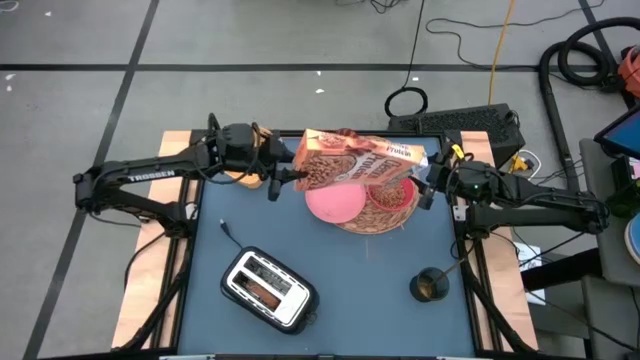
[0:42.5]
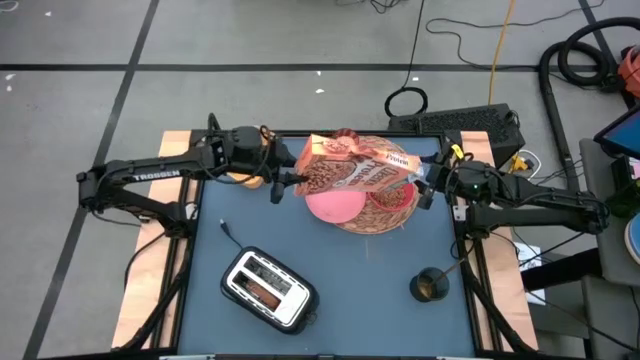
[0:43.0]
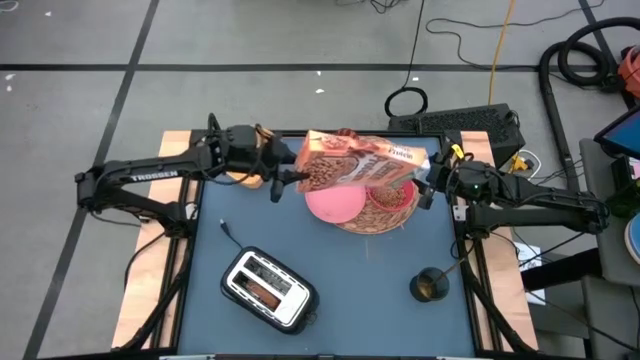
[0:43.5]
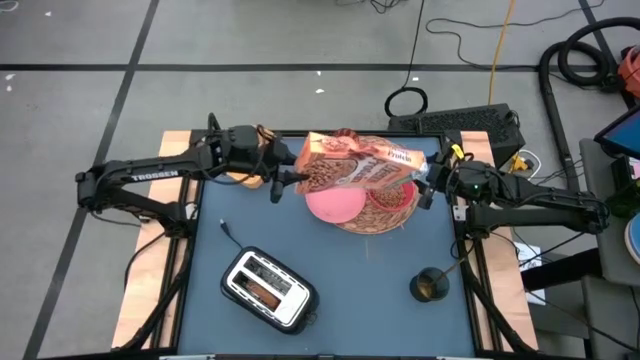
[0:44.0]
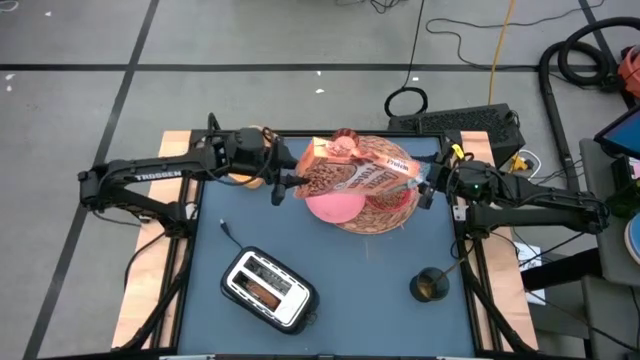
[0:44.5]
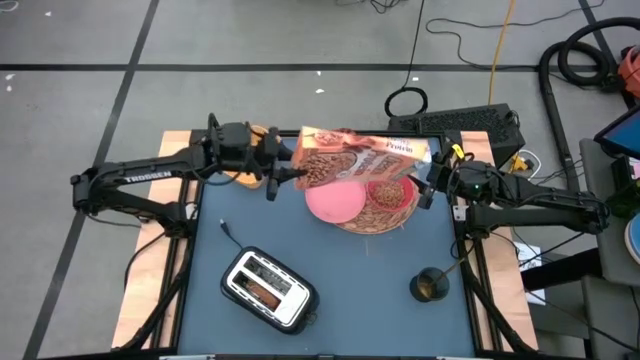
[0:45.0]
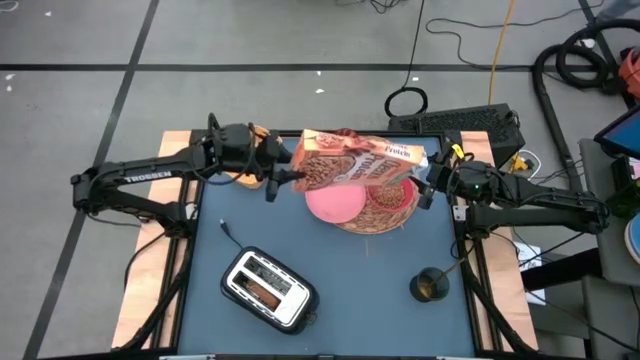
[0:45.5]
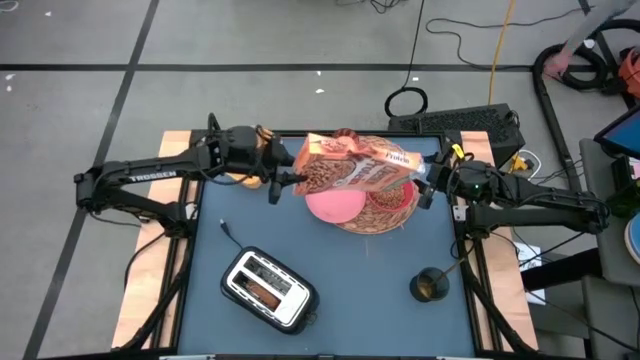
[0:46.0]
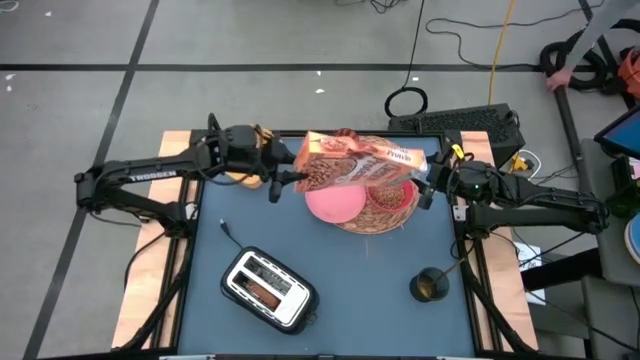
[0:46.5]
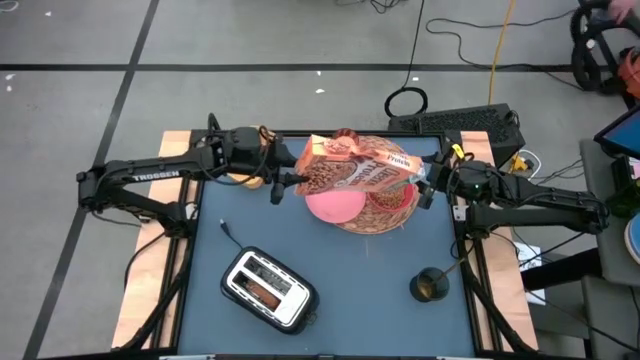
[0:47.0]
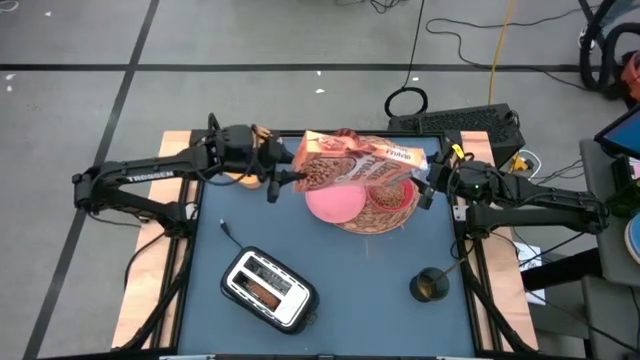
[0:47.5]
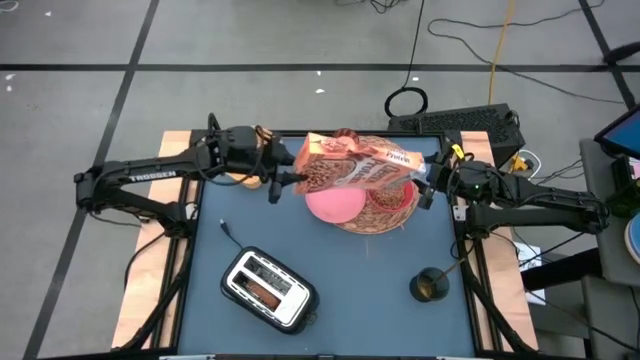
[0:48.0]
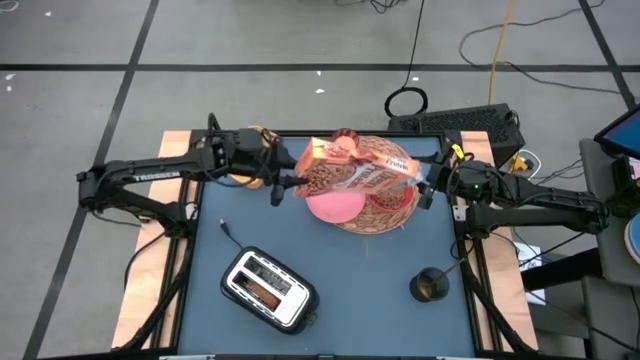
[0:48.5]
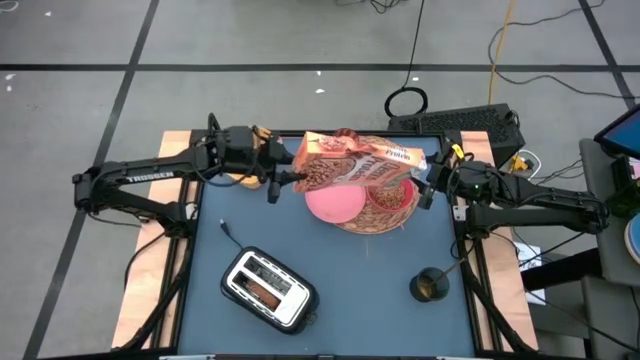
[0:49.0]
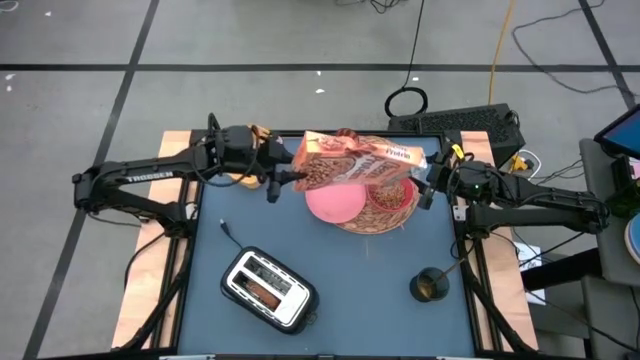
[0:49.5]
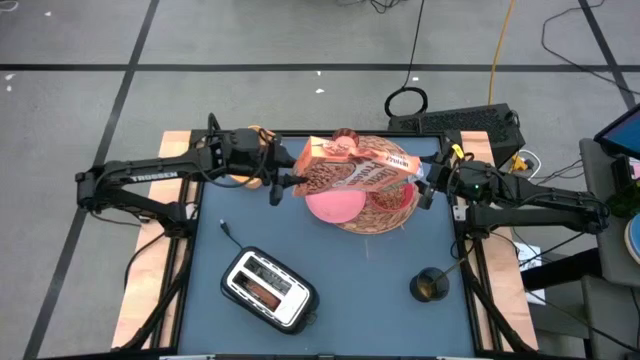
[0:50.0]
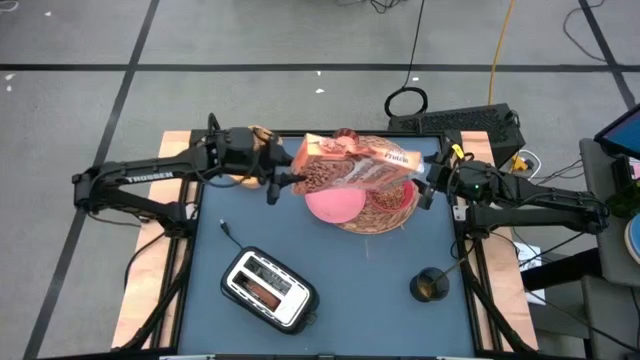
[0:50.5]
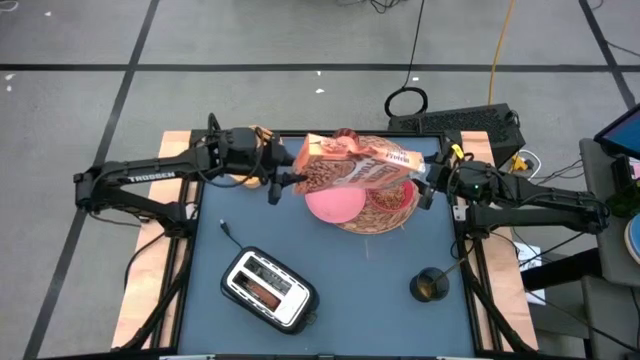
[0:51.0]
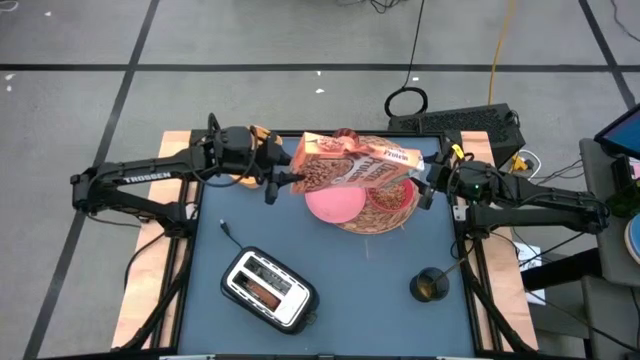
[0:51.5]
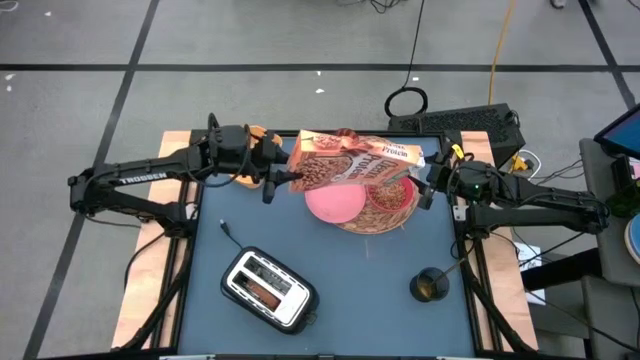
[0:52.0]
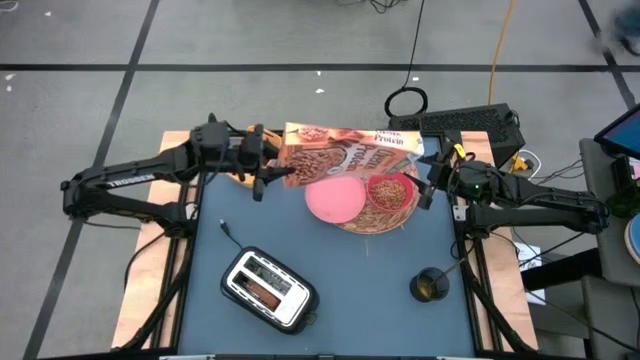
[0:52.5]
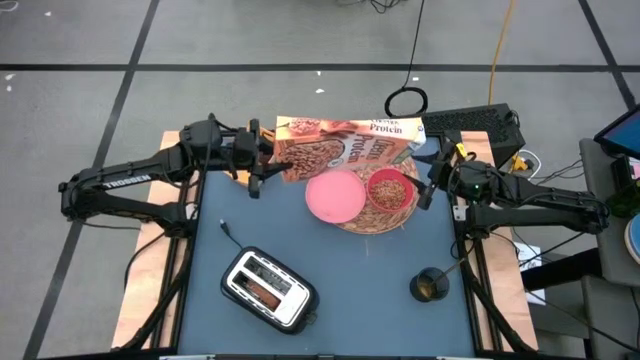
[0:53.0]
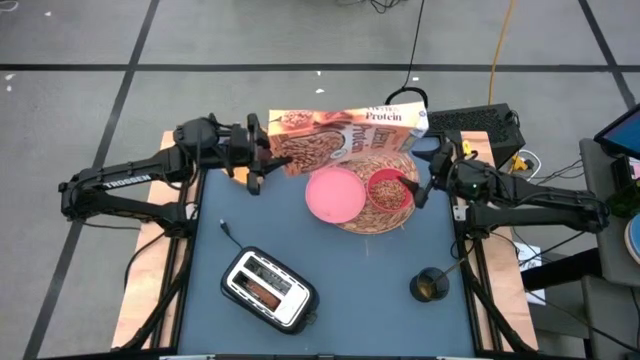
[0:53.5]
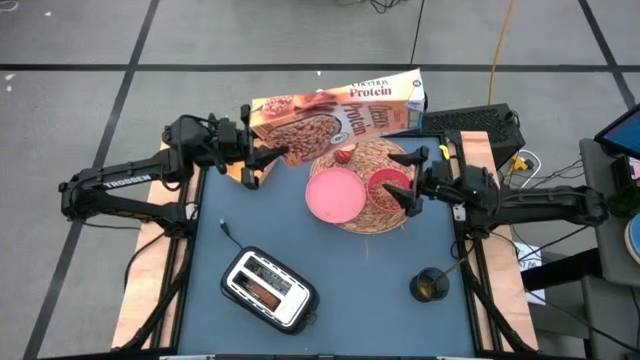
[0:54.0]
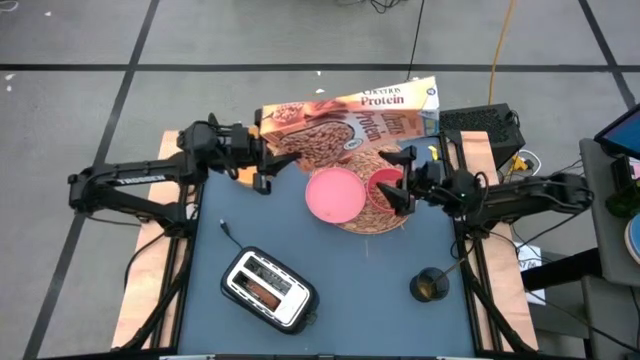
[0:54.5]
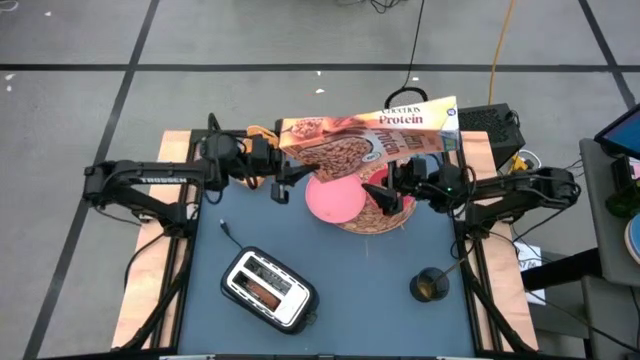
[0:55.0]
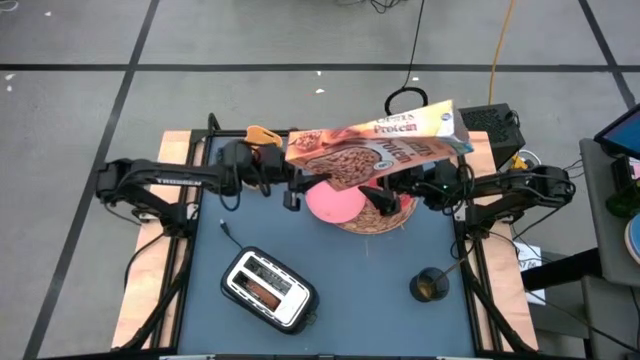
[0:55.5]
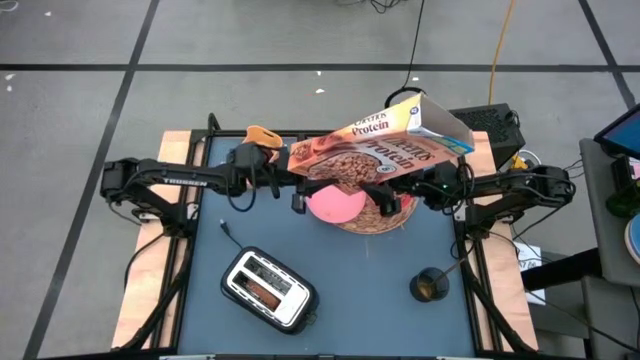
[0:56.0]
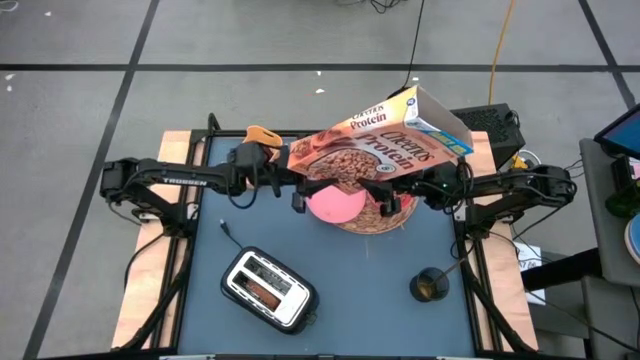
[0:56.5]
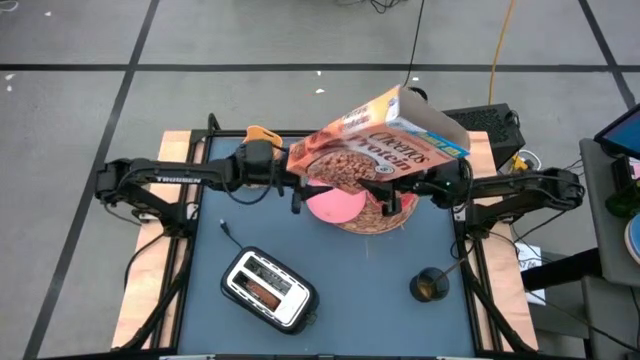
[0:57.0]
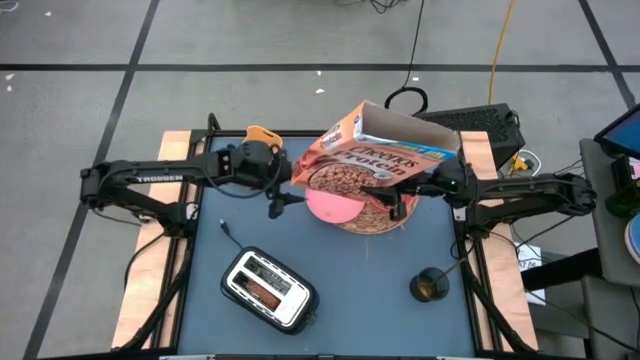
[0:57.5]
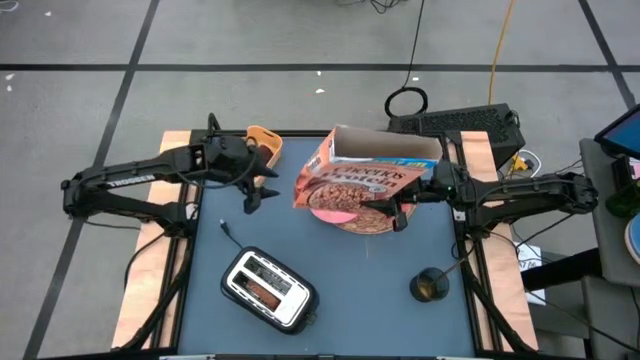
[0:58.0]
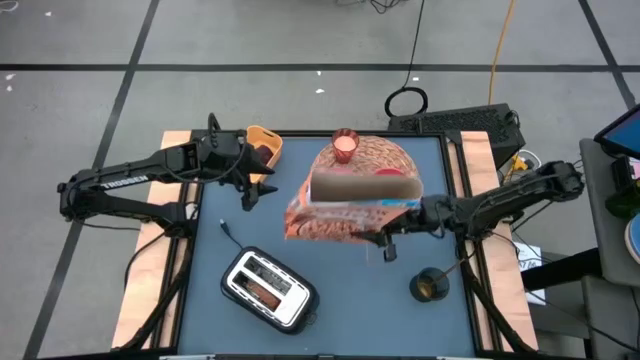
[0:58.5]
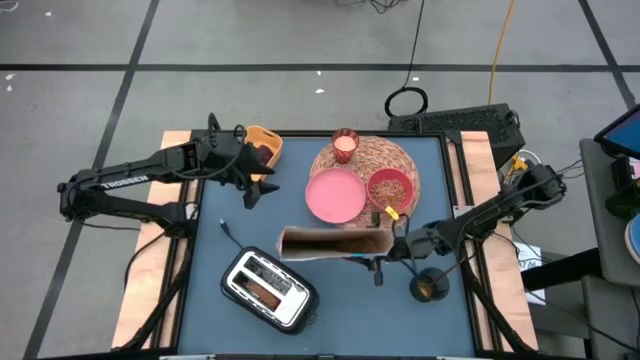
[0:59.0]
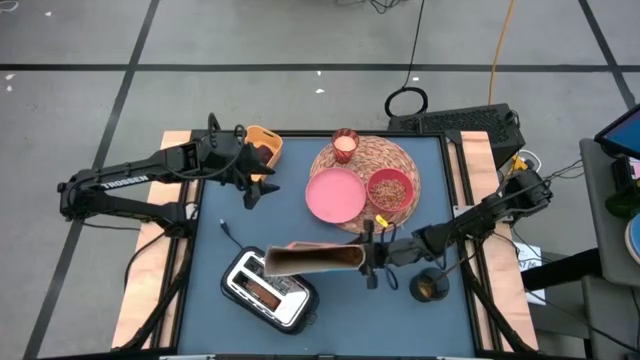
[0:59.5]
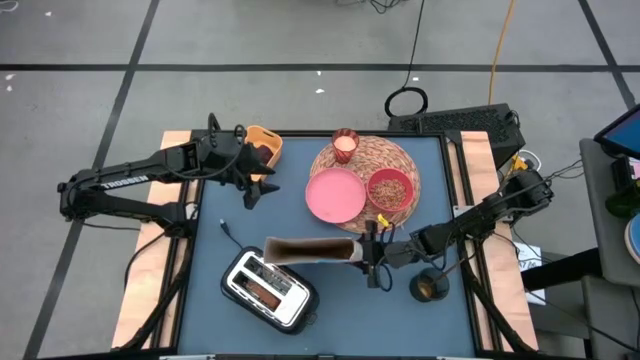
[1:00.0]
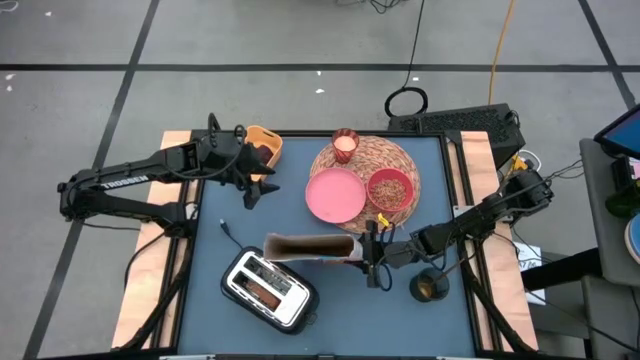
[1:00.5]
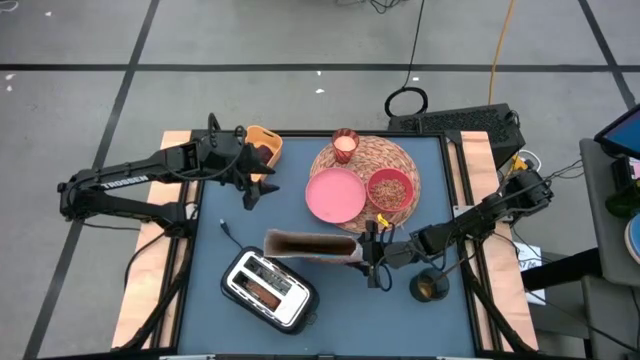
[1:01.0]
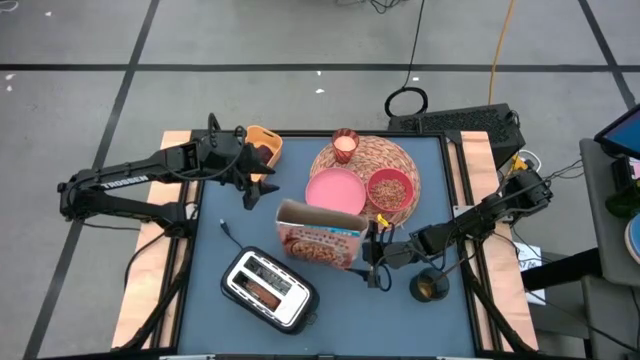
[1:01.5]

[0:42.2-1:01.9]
Task: Arrange a breakfast setting
Pour the cereal from the cereal box into the red bowl
